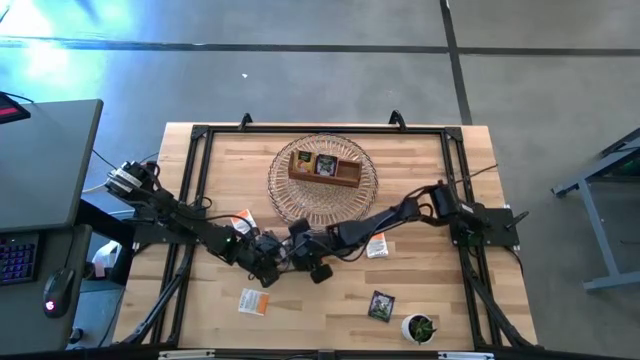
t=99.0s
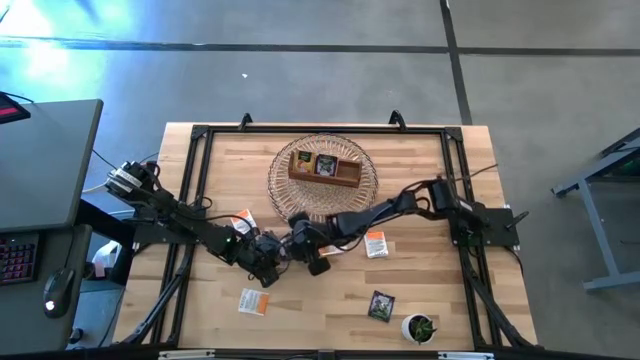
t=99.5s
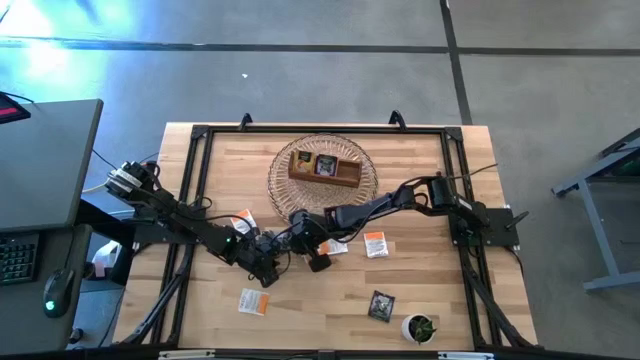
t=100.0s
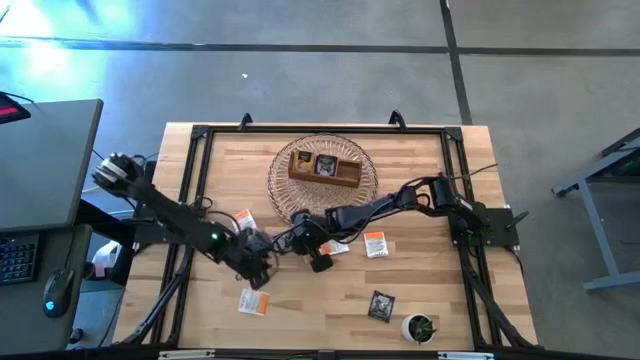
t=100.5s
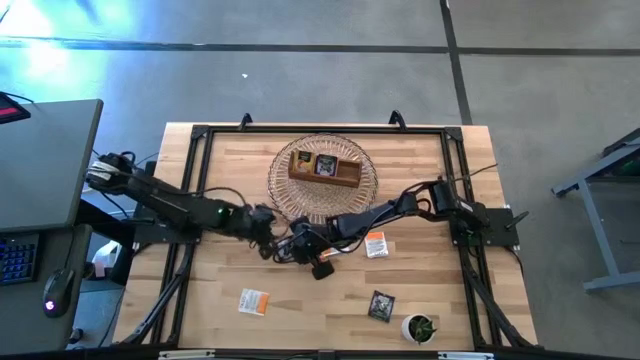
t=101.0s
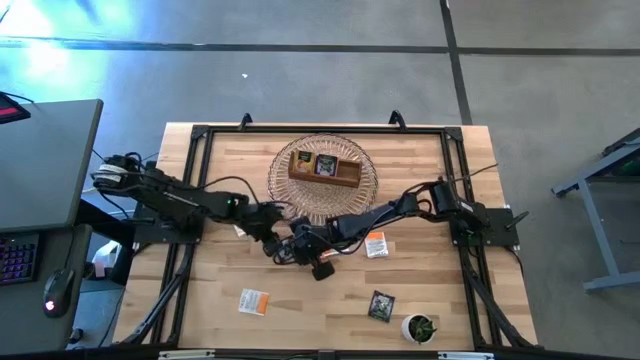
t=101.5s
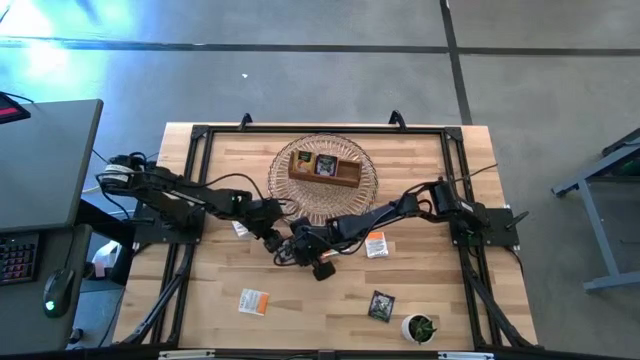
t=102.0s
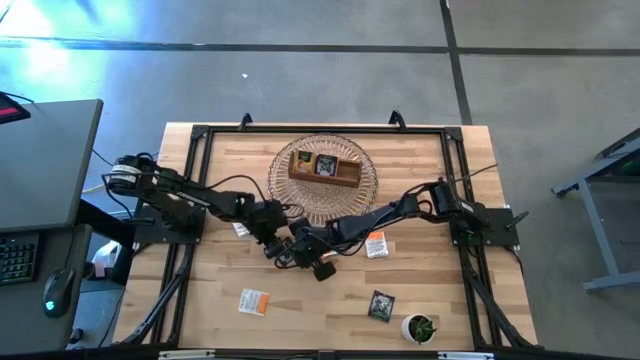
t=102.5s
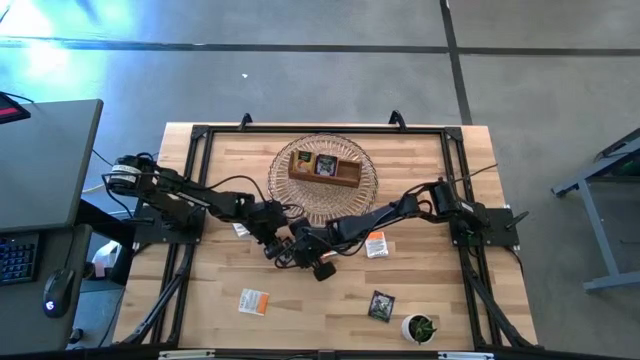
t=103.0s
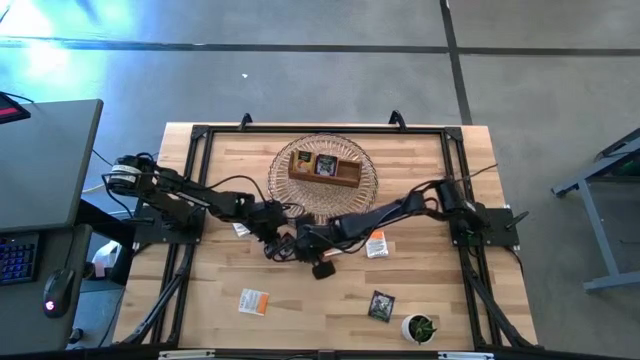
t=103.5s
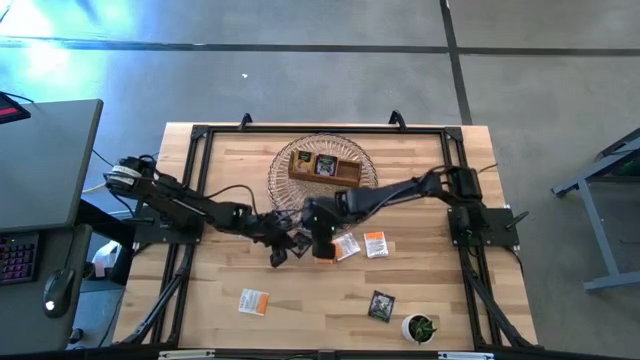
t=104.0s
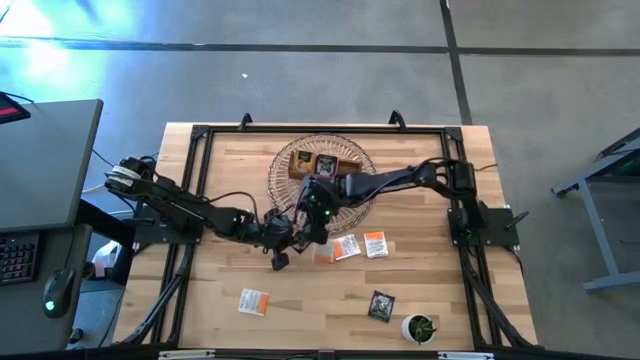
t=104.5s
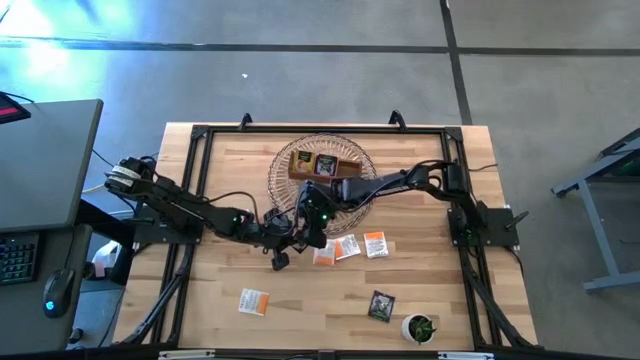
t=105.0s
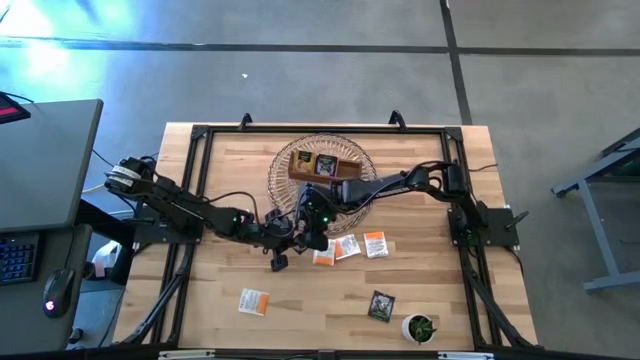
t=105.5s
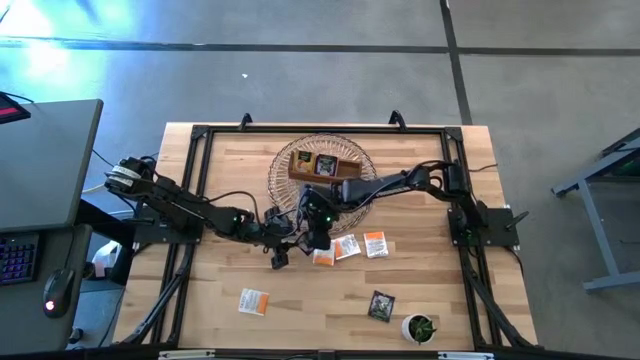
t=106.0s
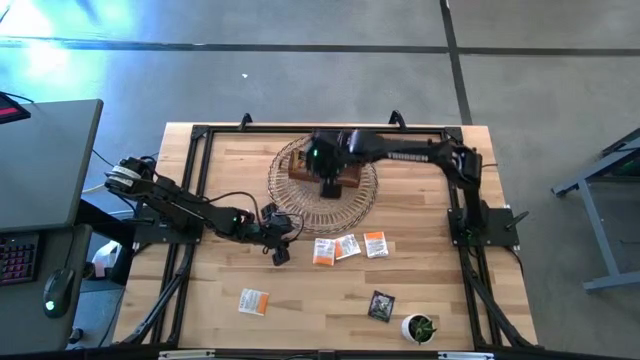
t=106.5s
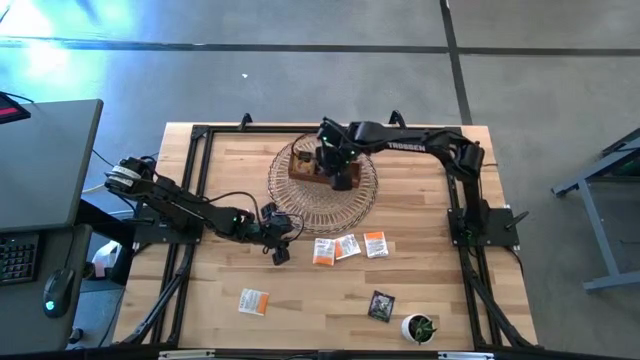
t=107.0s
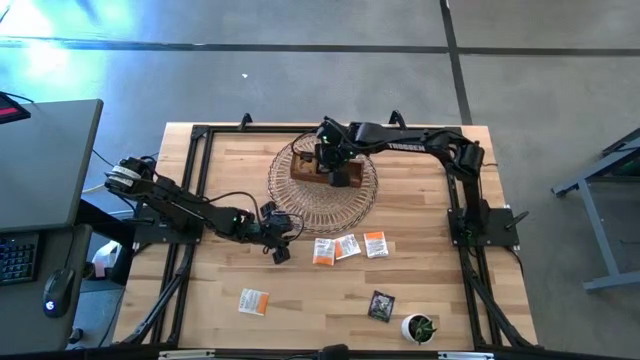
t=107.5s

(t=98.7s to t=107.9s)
Task: Pick & Place Tea
Put the black tea bag into the middle section of the wooden organizer

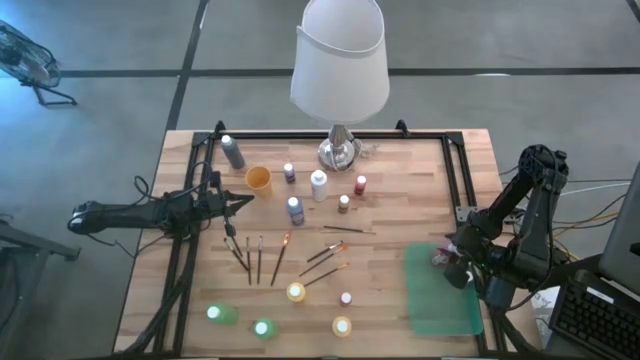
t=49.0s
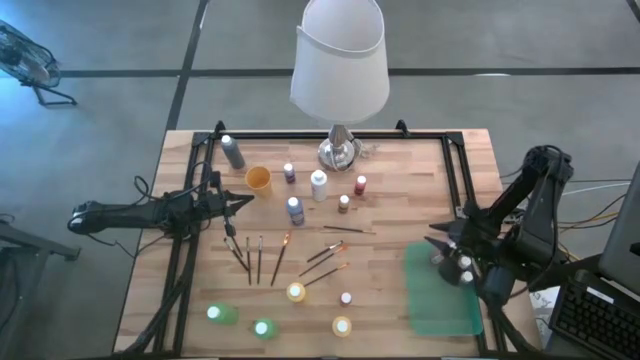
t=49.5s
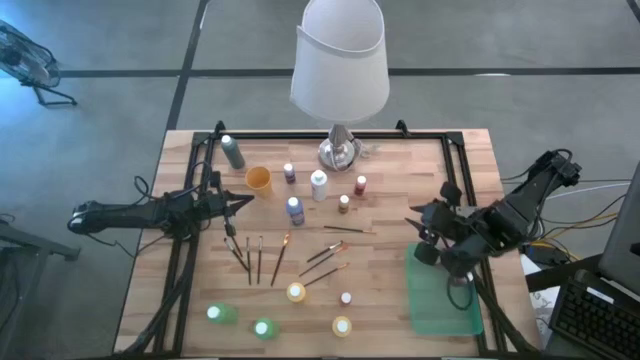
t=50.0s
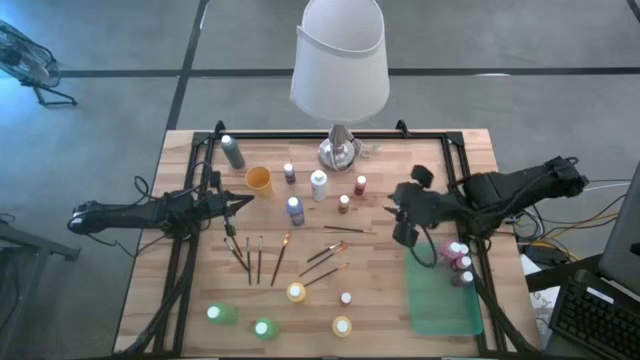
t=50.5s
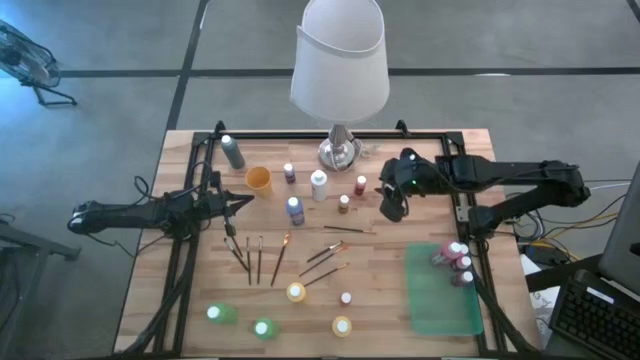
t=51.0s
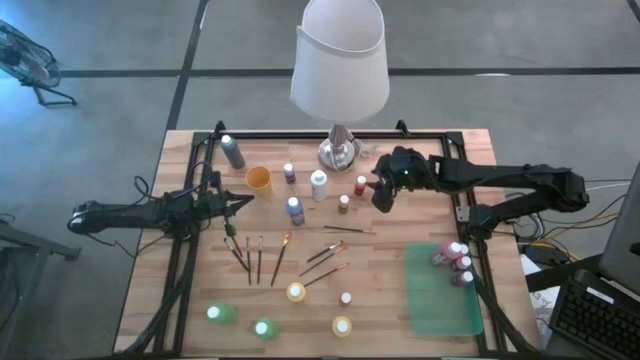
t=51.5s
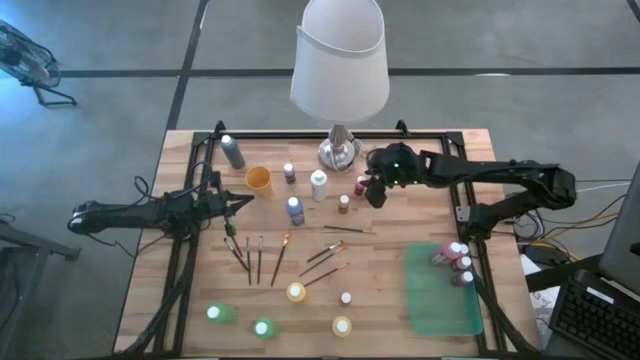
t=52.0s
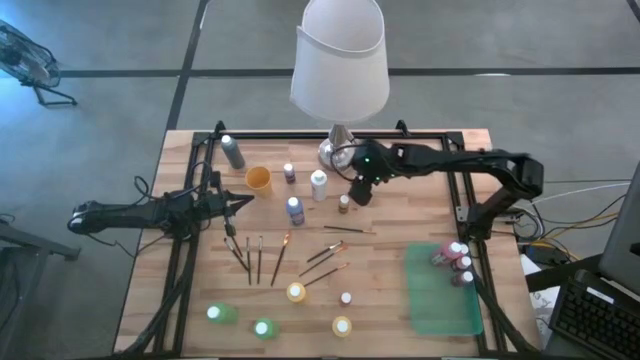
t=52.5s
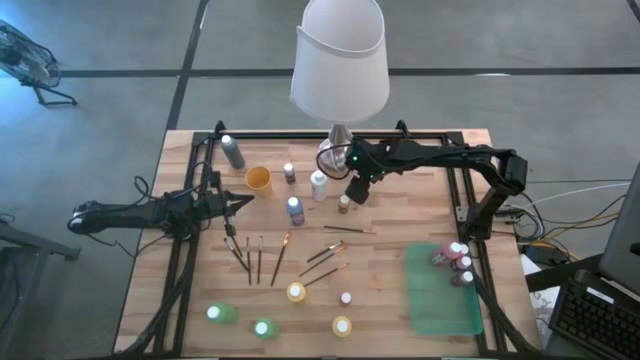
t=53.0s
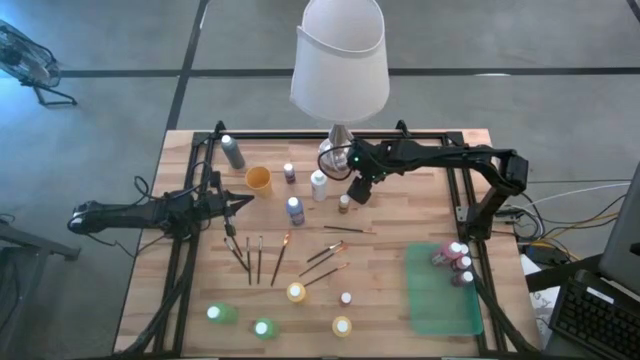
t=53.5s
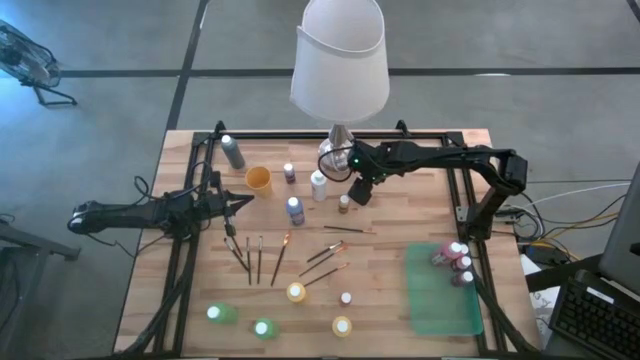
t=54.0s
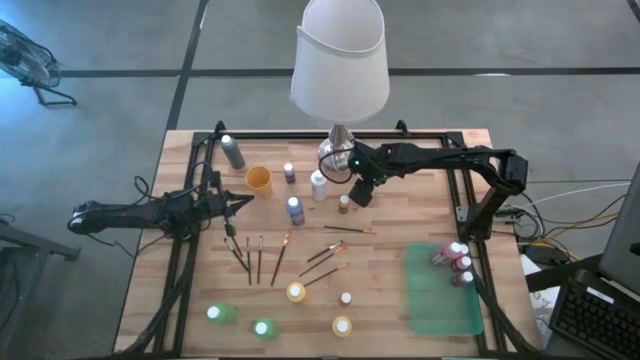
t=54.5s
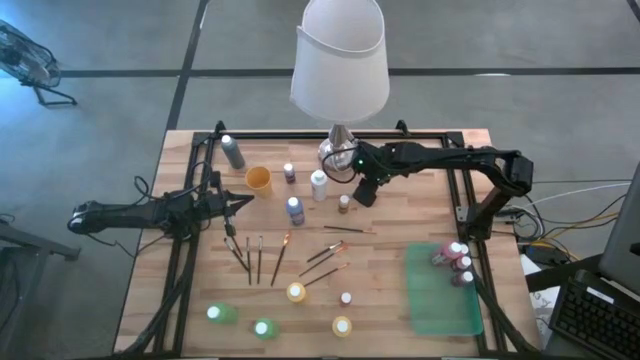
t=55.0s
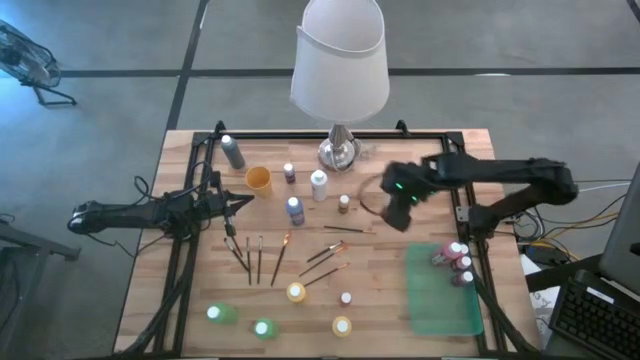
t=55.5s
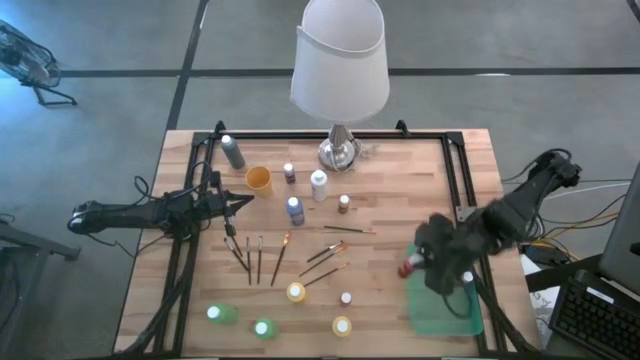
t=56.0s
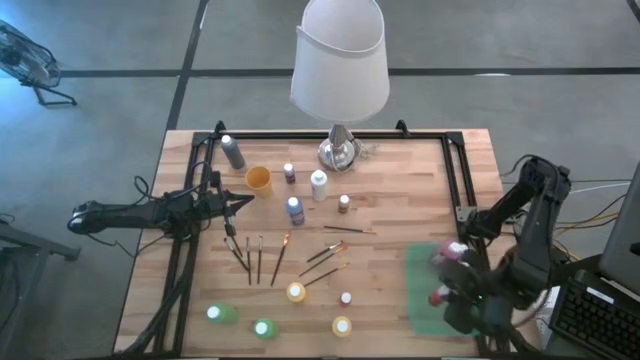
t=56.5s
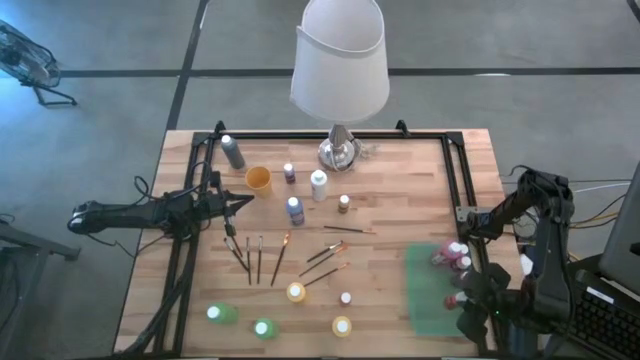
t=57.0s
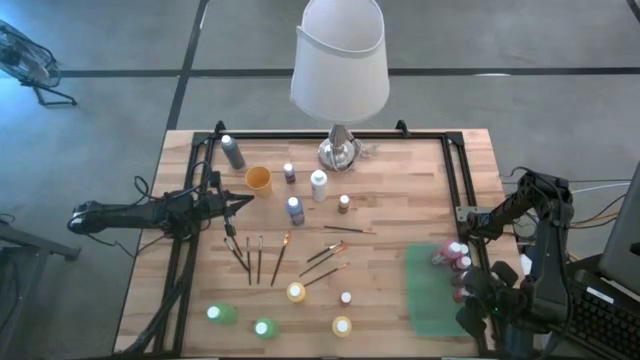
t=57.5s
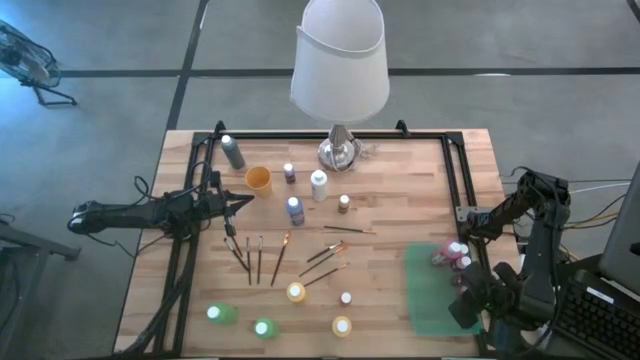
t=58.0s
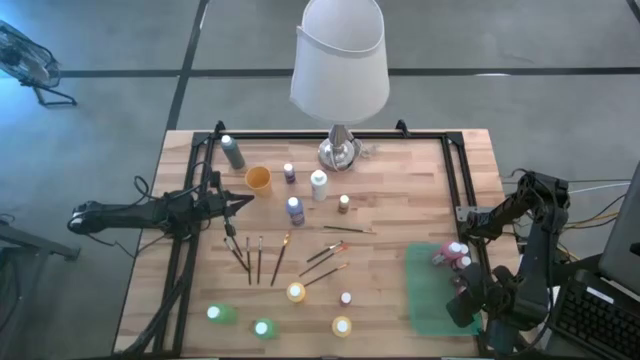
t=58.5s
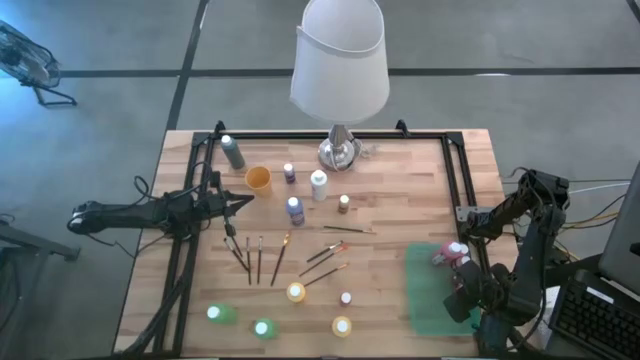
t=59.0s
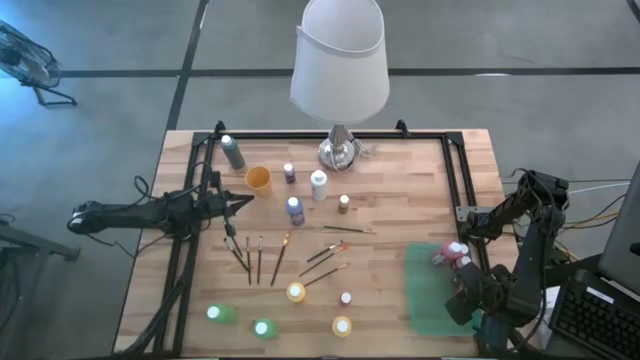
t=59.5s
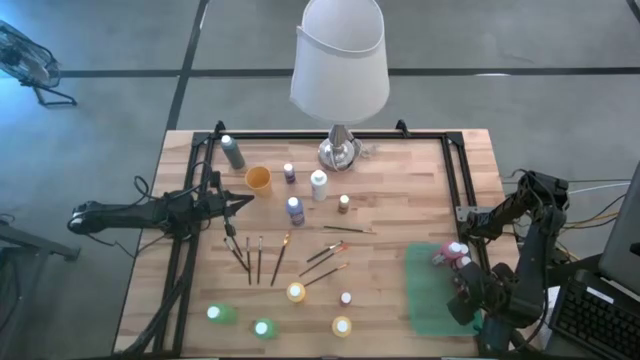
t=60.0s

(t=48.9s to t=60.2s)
Task: Pick & Place Paint Supplies
Put the orange paint bottle into the green bin
